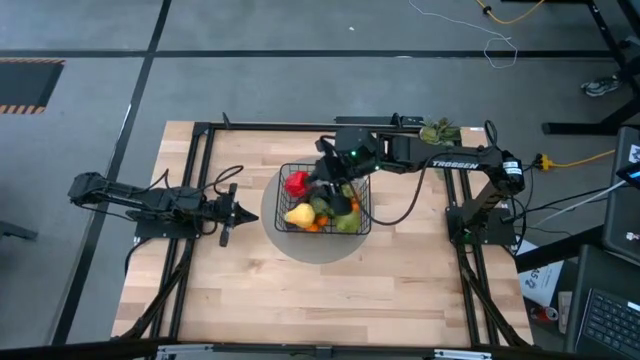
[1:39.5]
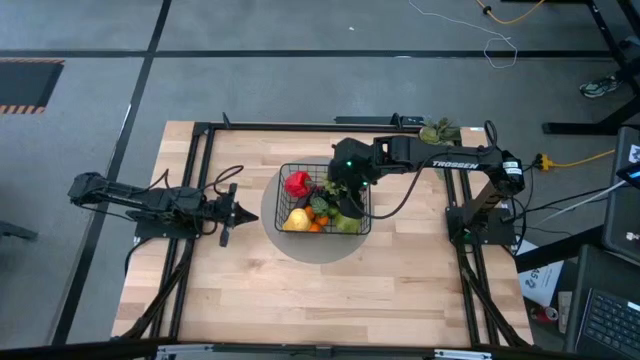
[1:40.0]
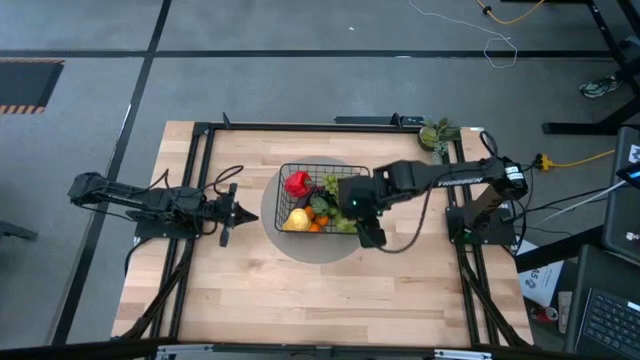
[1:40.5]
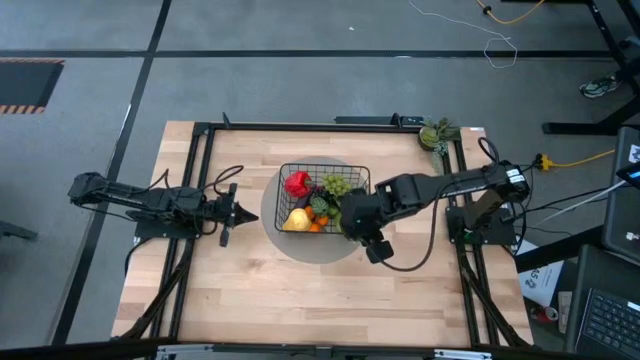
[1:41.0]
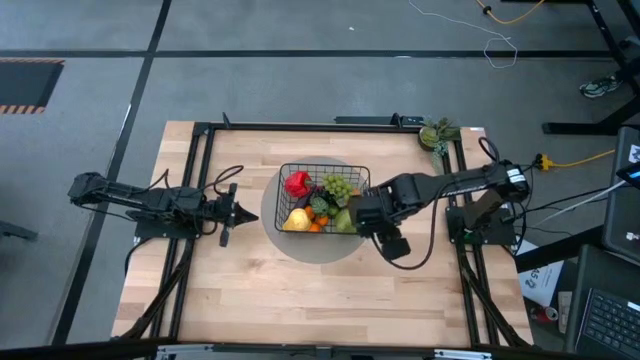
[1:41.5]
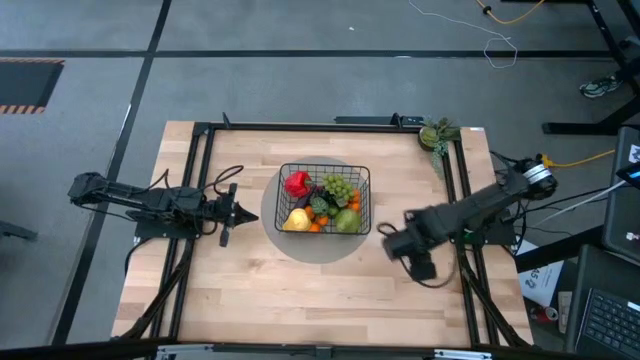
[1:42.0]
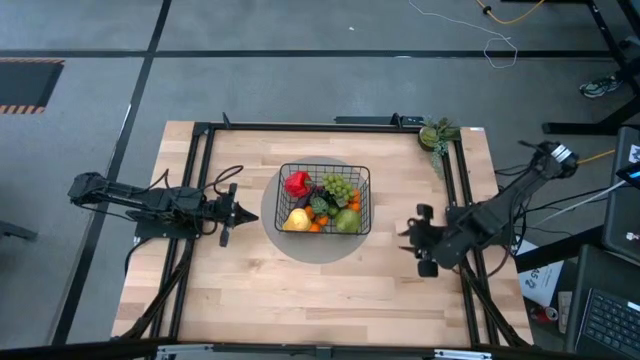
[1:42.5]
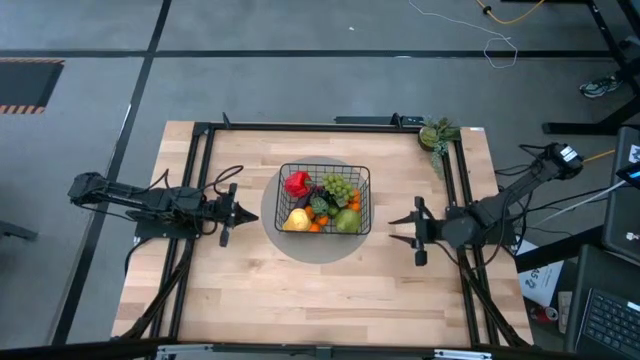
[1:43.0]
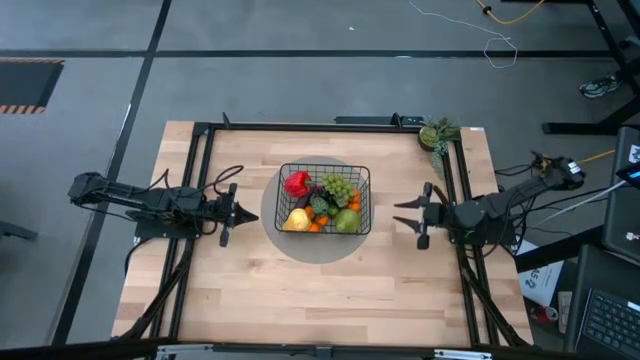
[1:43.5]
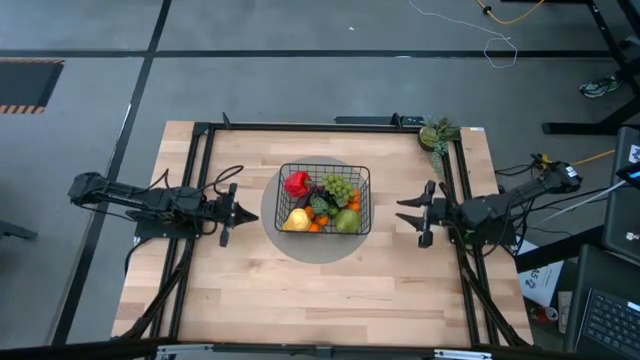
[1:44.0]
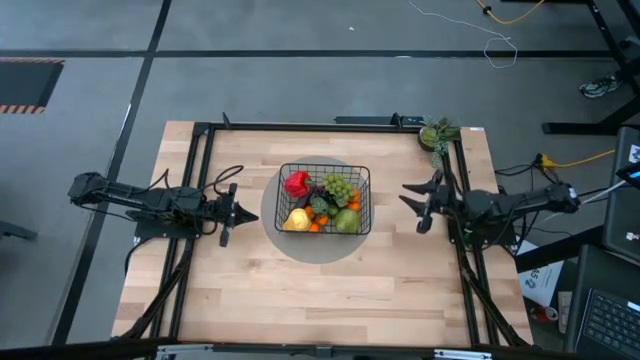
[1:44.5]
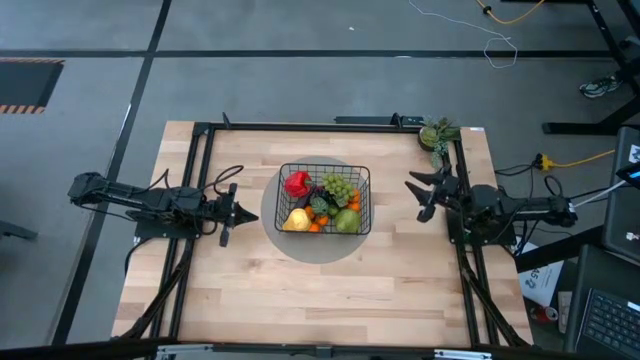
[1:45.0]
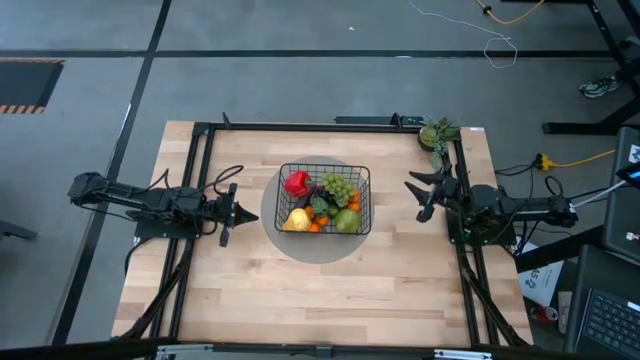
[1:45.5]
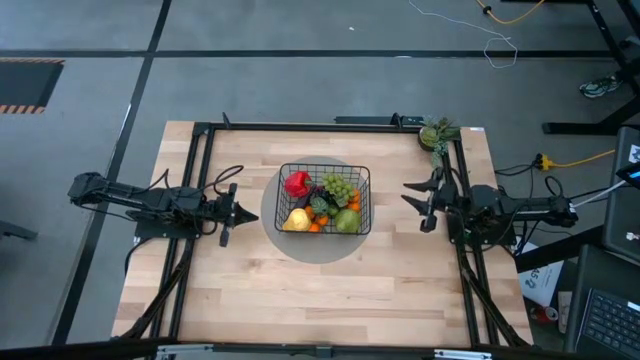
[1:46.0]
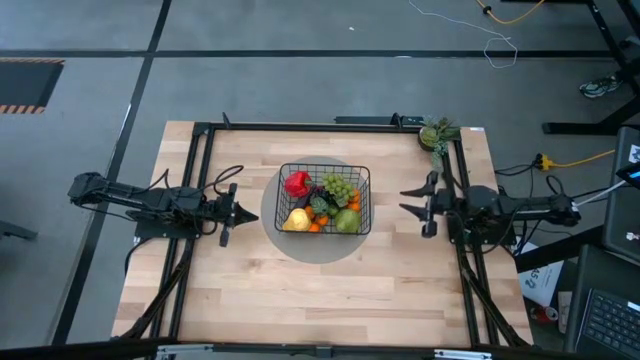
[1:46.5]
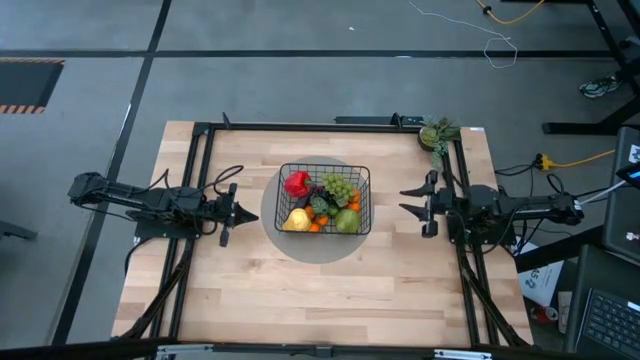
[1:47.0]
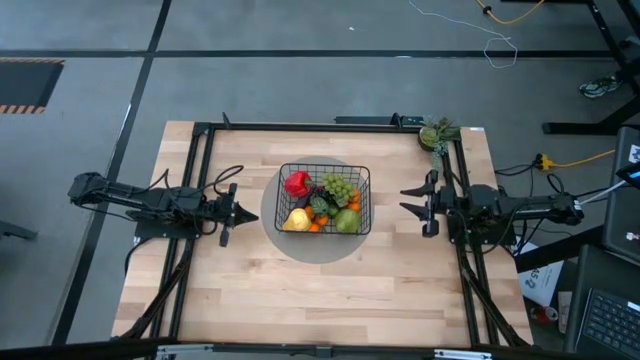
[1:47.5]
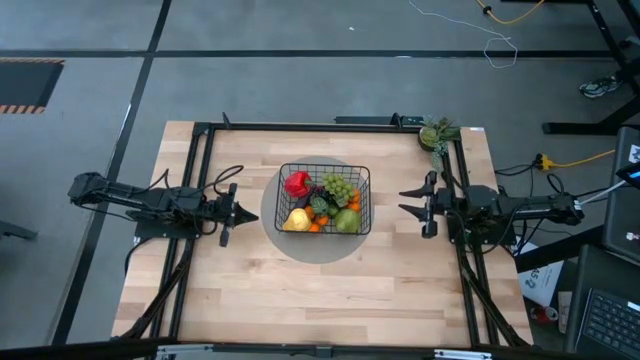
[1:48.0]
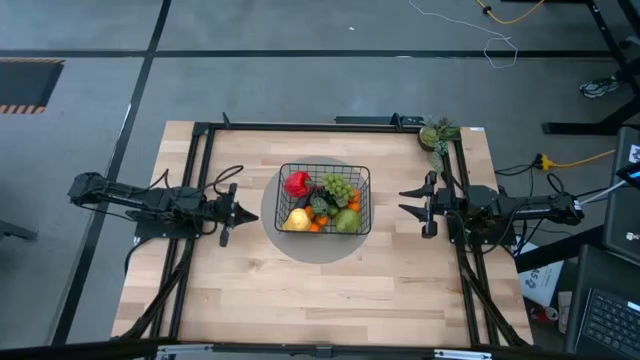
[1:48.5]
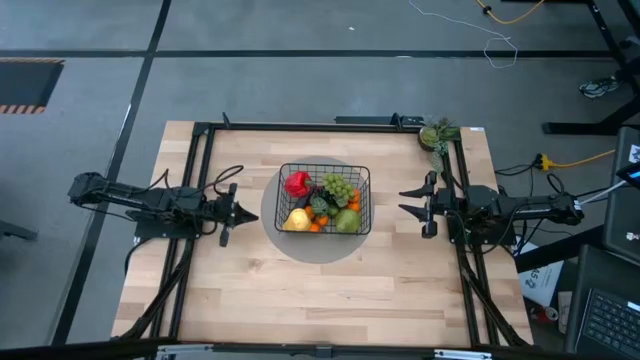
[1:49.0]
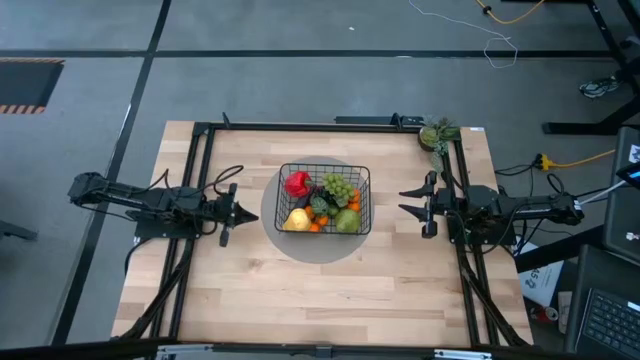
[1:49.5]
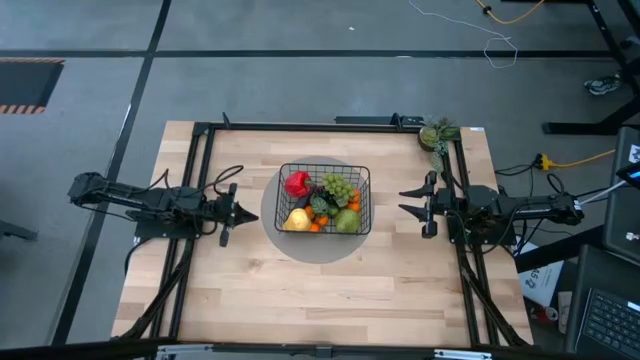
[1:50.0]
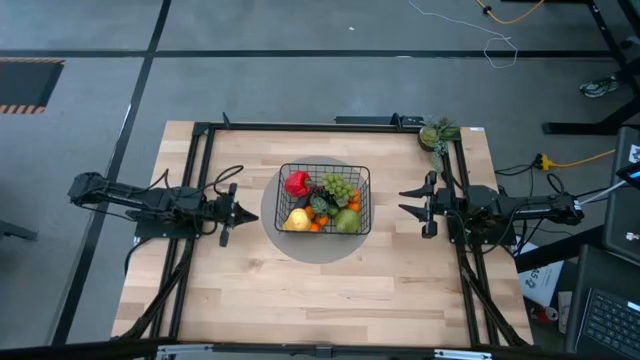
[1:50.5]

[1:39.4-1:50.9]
Task: Build produce basket
Return to Home Position

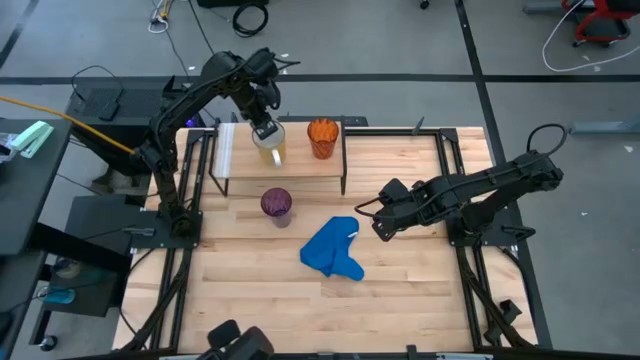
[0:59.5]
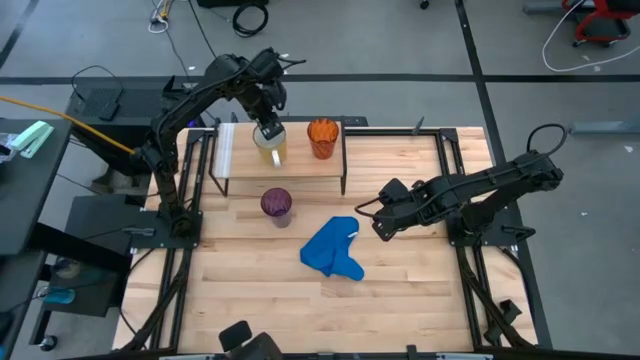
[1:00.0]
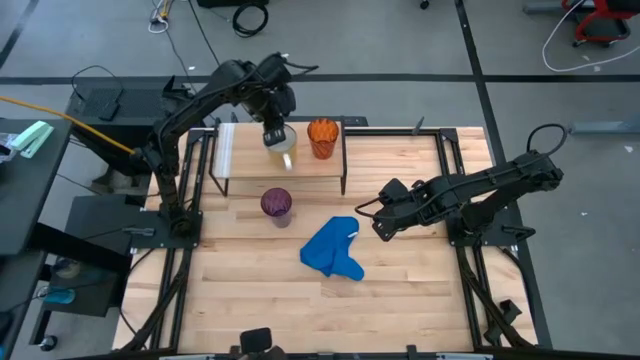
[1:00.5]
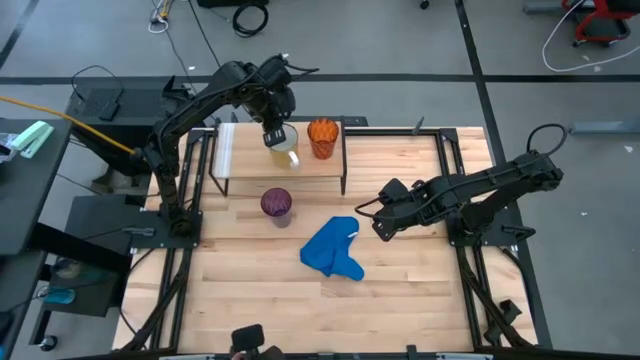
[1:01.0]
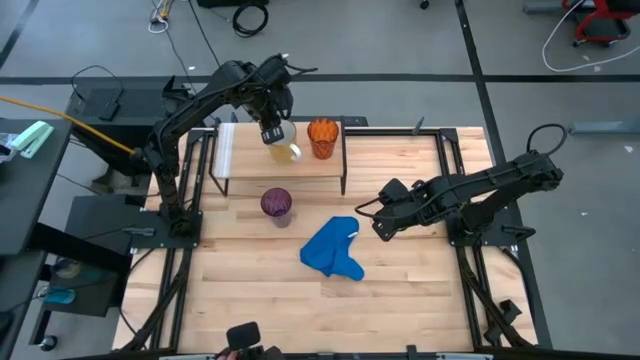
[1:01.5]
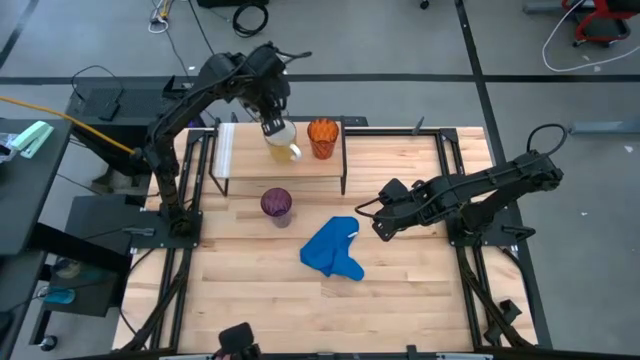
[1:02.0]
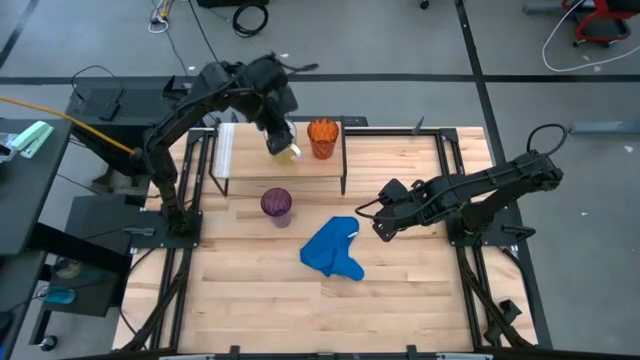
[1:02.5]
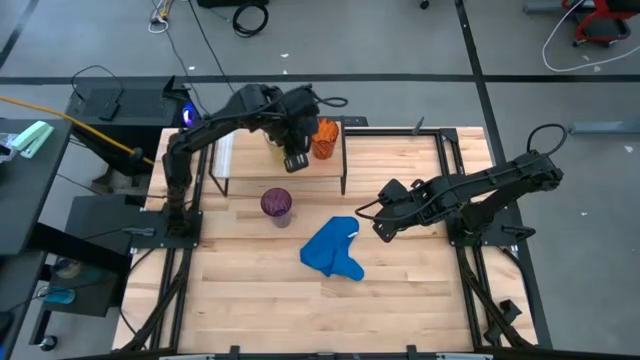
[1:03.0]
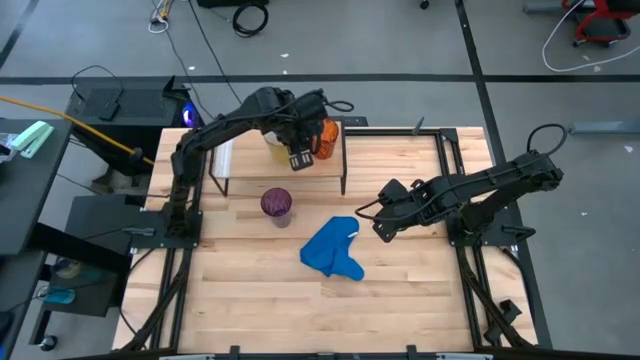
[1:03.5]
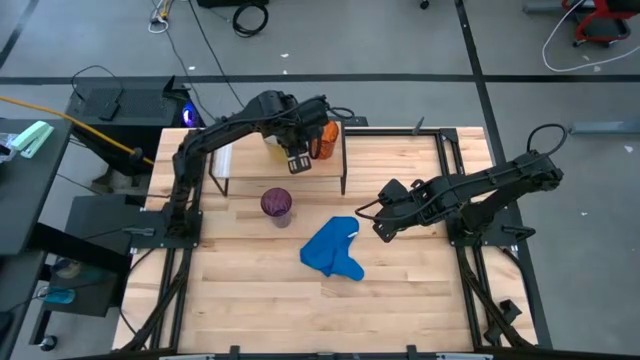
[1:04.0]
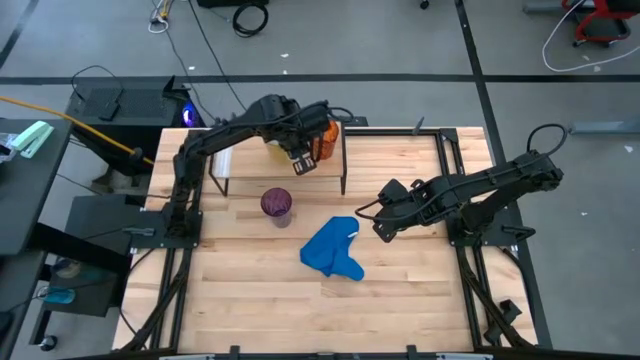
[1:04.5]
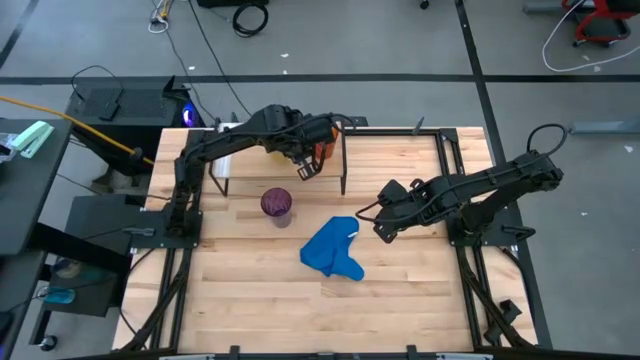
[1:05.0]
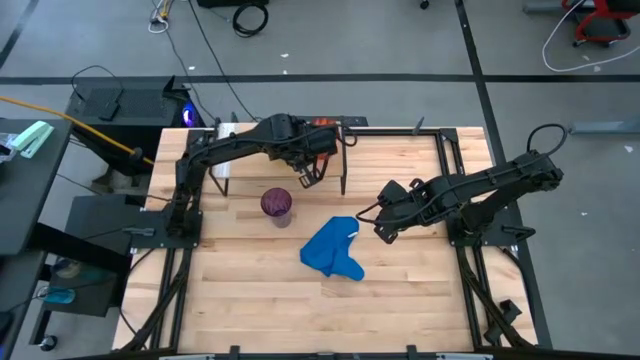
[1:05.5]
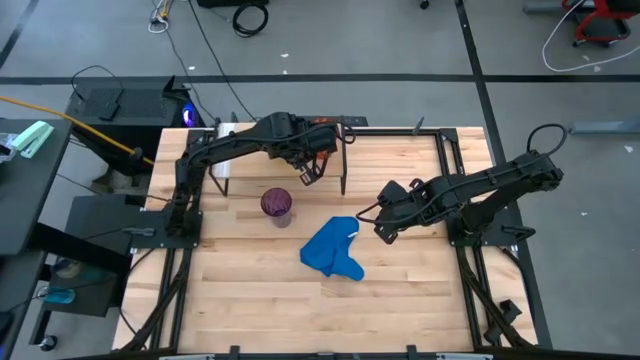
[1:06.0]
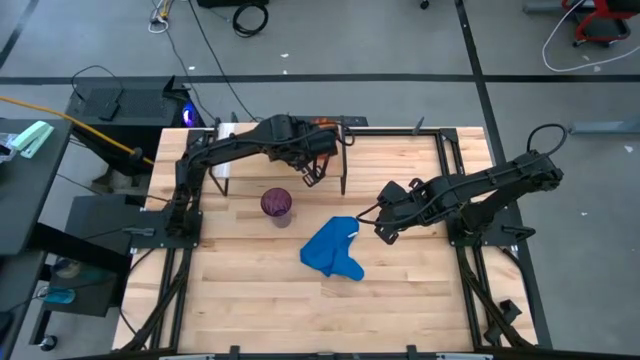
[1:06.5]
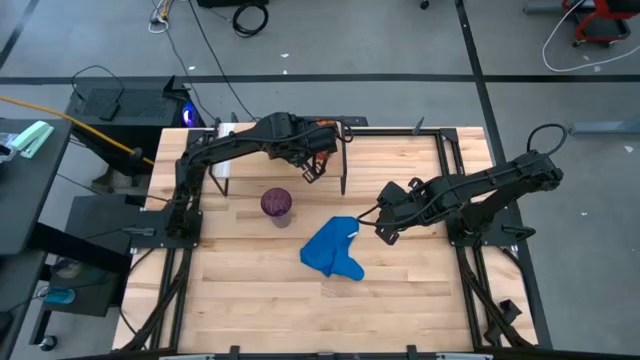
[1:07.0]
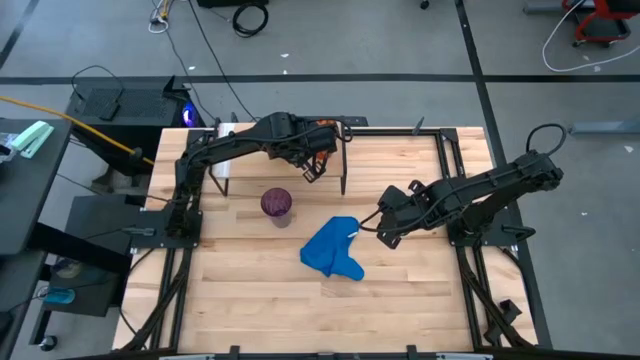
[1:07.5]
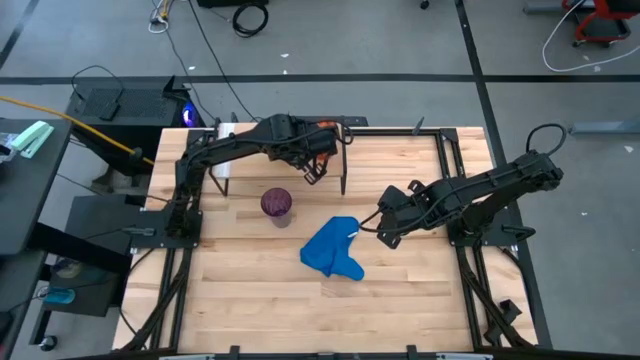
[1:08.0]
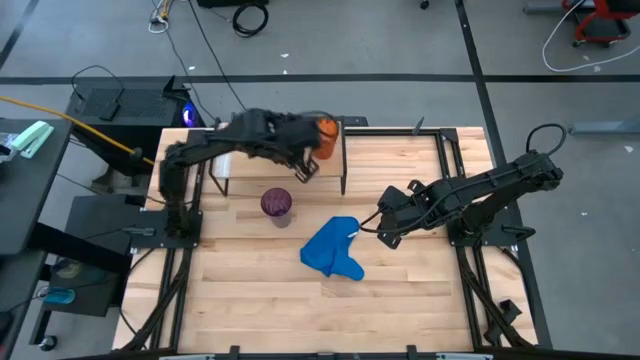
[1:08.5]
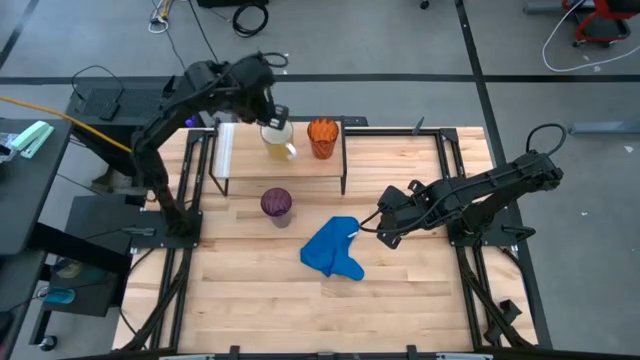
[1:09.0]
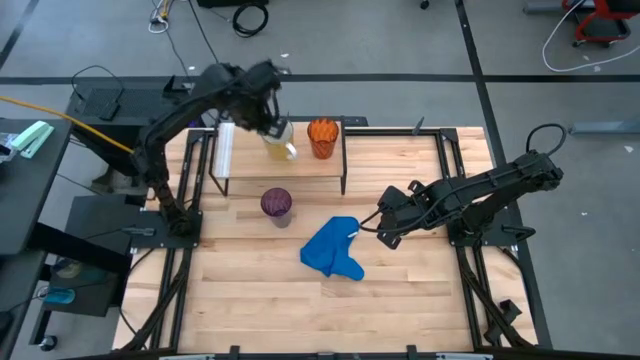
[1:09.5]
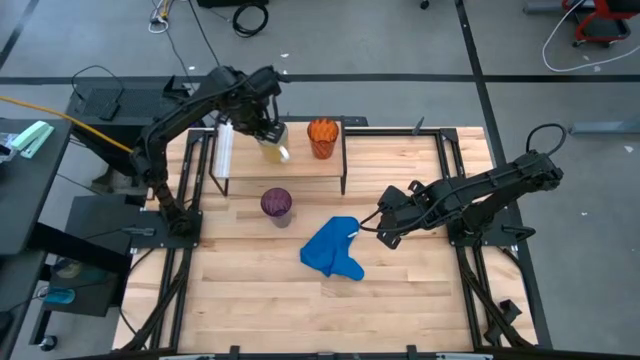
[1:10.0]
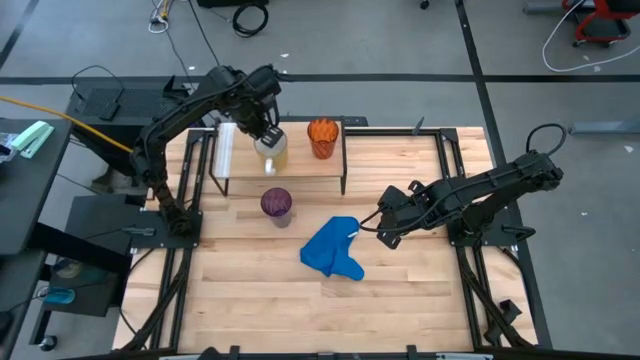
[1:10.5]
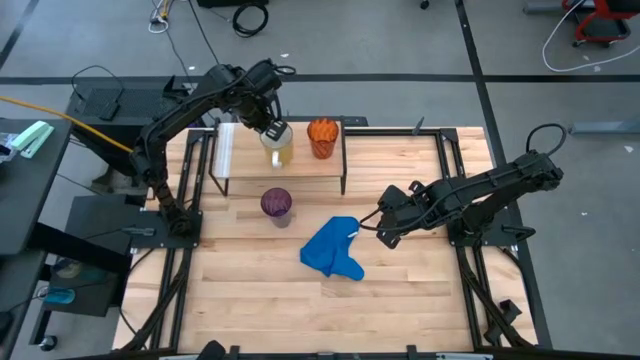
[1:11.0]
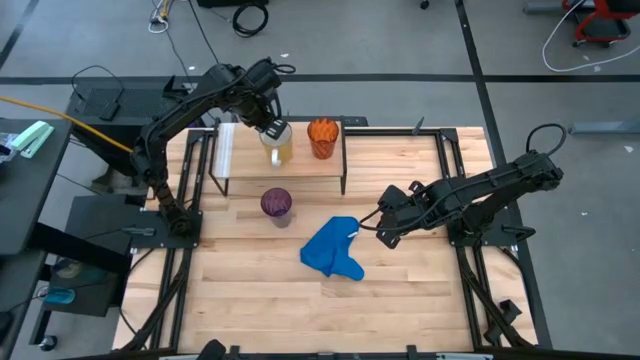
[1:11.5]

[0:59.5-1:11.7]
Task: Stack small to large cups/mugs on shelf
Put the yellow mug on the shelf
